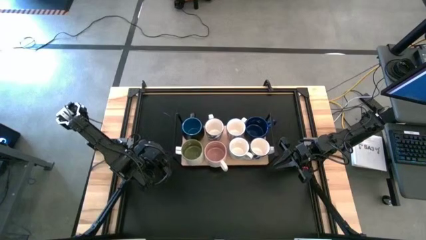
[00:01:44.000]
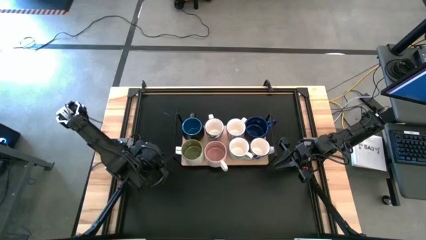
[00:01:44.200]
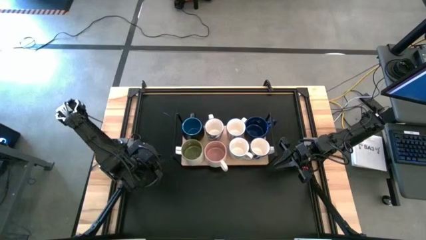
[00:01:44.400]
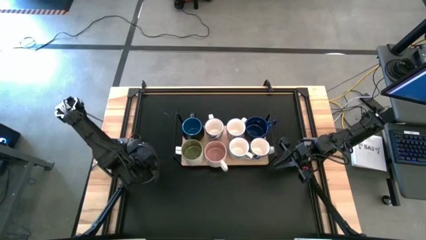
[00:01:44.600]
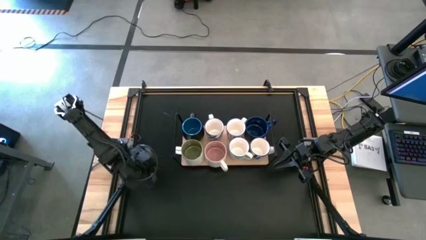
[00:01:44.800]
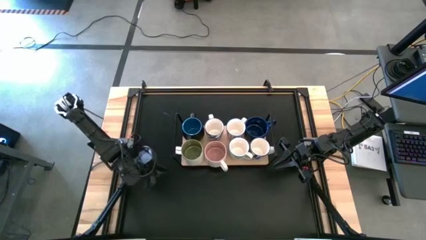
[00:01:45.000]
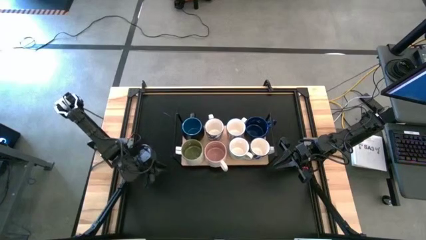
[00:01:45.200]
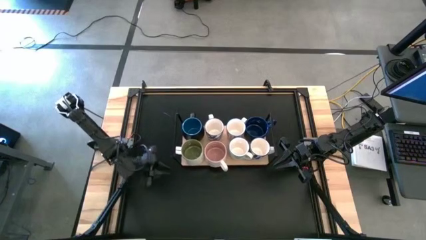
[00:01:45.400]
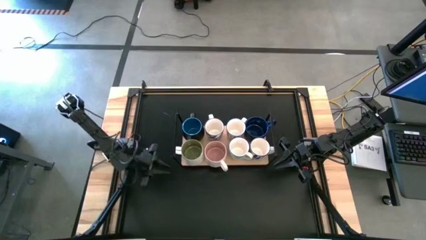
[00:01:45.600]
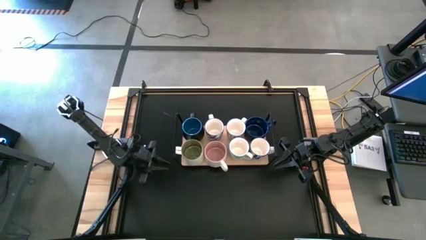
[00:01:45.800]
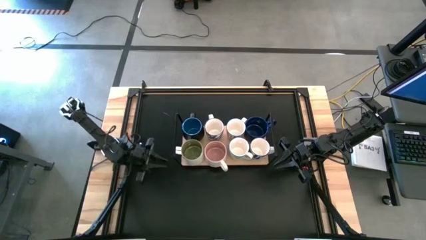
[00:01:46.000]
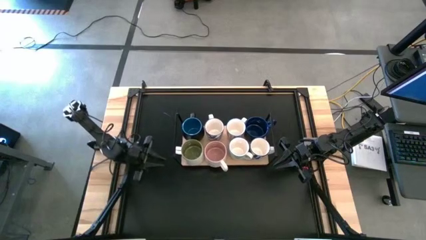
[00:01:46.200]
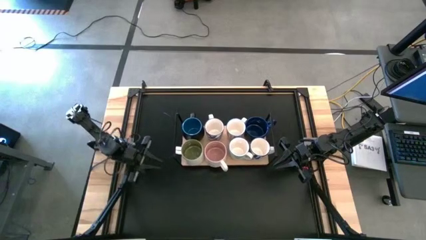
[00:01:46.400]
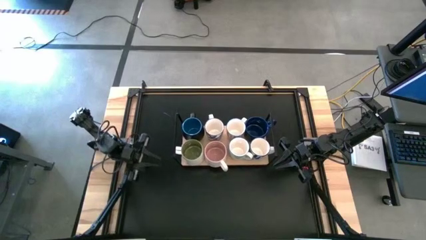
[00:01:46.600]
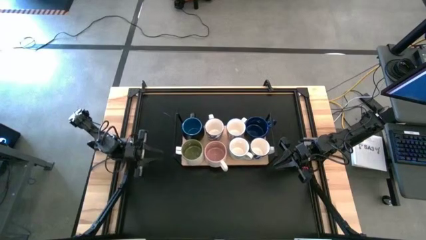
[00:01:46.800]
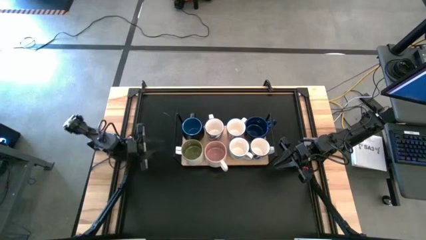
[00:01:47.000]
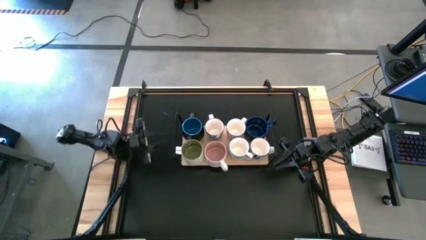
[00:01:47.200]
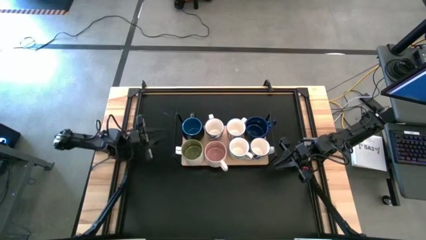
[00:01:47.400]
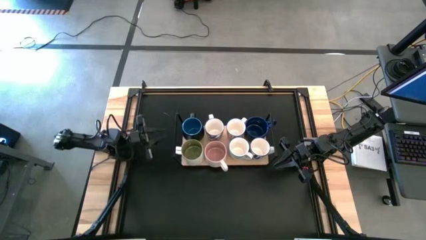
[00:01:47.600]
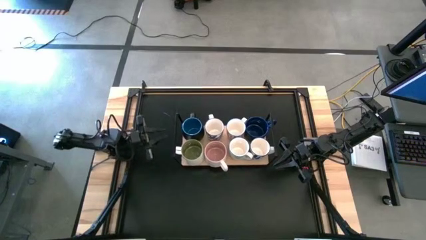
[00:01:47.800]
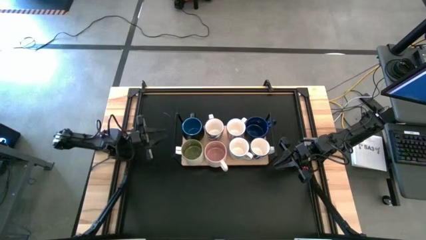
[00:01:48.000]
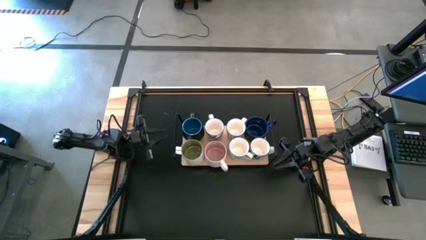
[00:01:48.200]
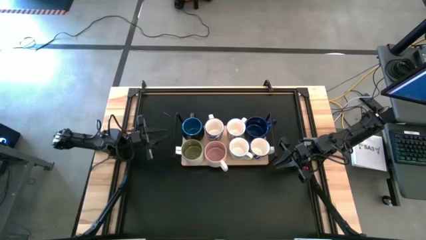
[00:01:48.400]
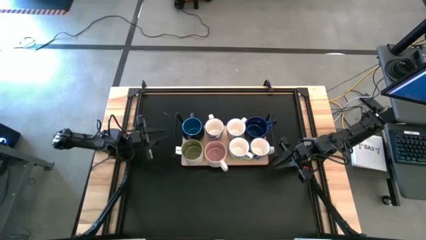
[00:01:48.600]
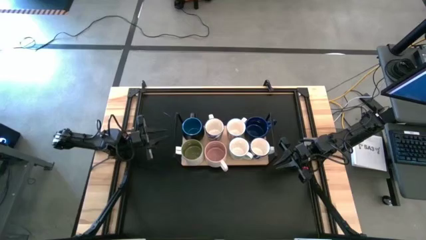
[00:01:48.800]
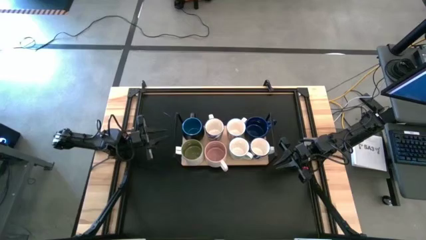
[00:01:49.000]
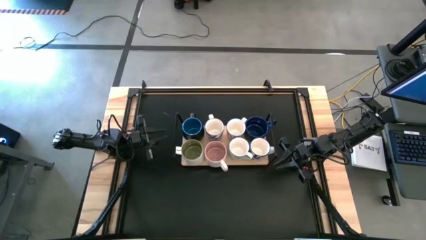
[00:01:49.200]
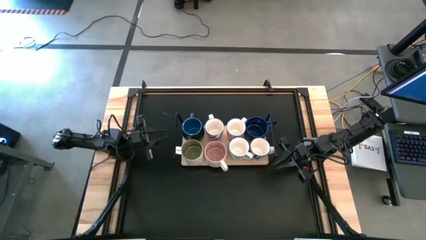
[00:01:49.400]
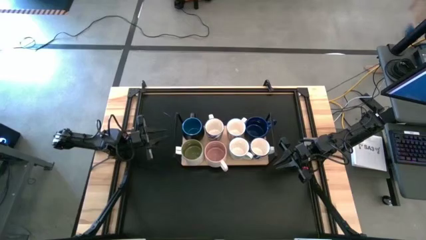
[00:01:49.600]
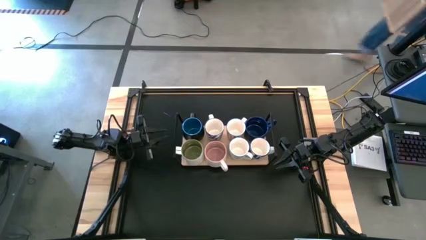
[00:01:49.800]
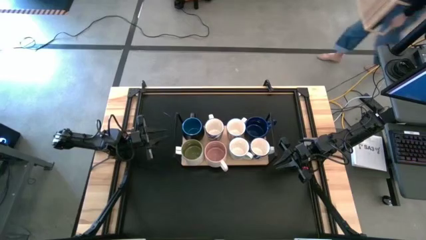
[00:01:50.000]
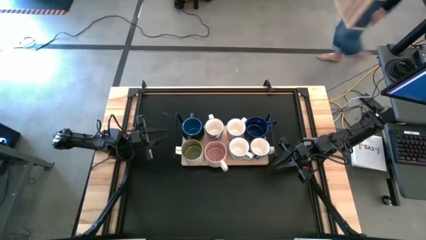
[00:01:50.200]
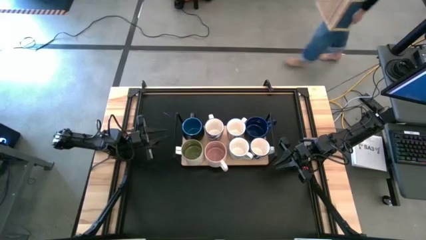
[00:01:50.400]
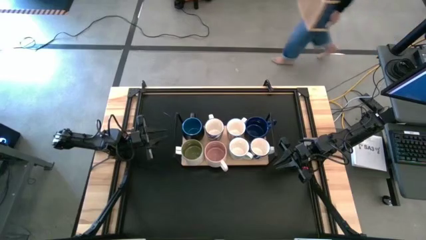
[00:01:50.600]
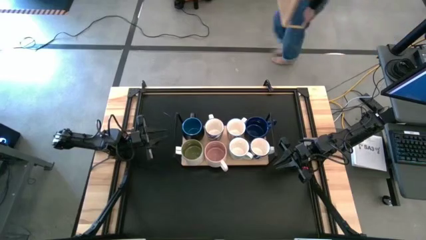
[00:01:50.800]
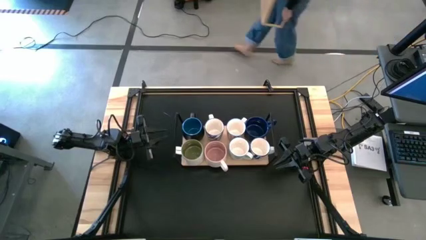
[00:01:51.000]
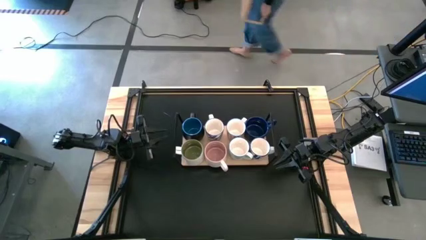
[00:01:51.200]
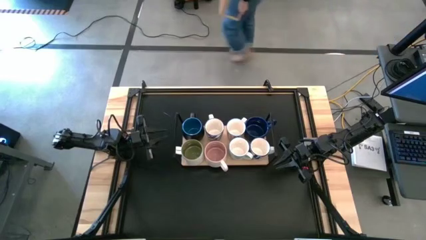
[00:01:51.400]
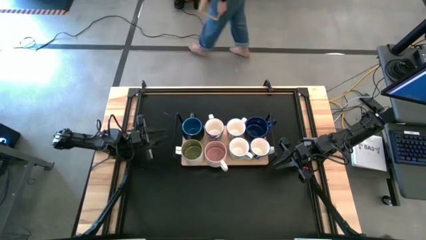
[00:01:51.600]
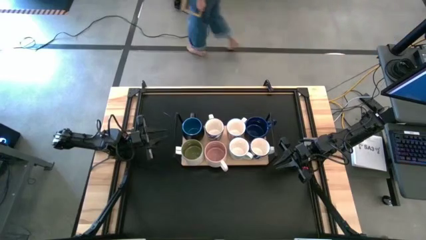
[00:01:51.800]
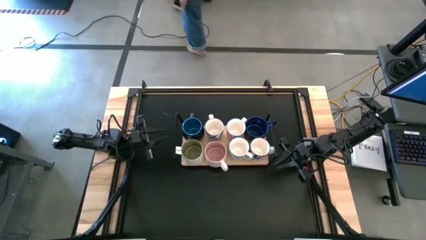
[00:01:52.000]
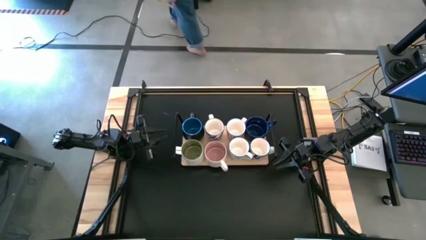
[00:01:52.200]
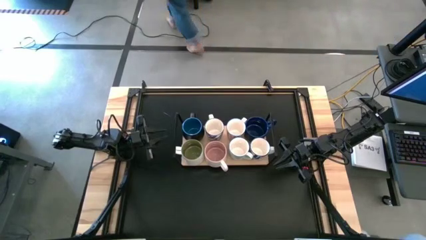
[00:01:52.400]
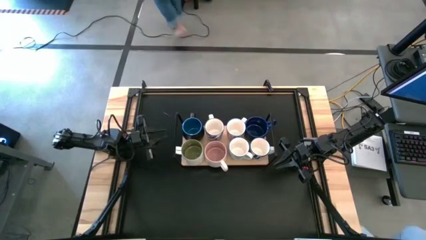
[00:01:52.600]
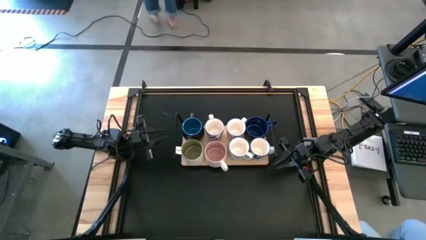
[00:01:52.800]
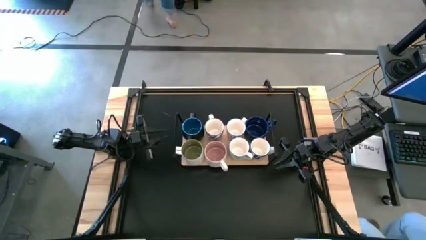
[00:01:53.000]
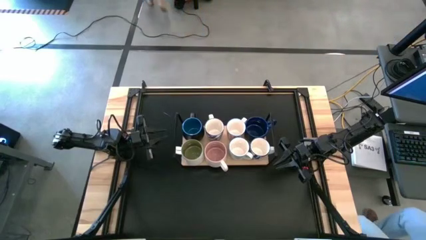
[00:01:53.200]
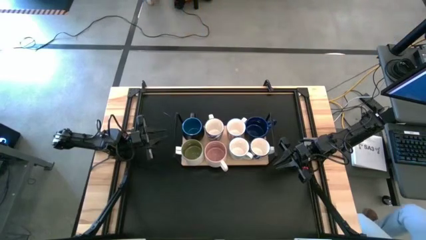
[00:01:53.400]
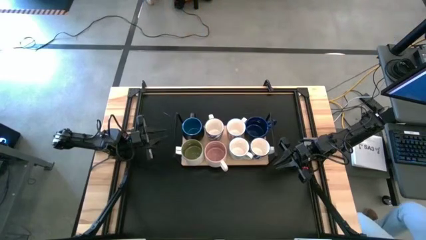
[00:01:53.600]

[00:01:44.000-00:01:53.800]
Task: Place coffee mugs
Return to Home Position

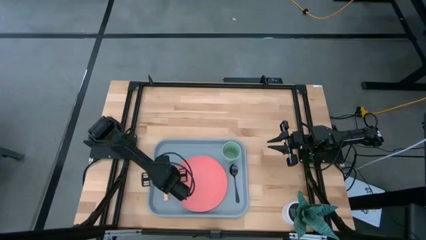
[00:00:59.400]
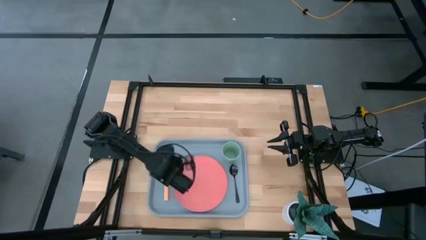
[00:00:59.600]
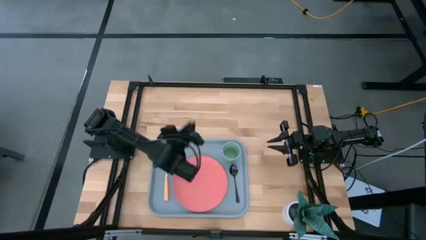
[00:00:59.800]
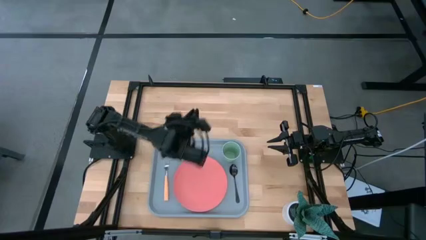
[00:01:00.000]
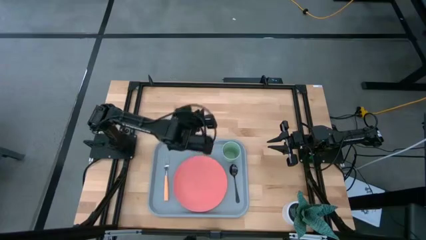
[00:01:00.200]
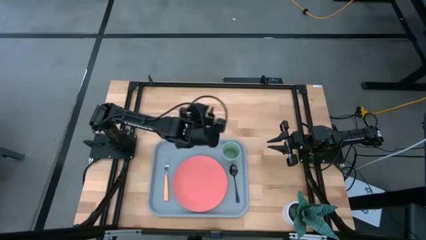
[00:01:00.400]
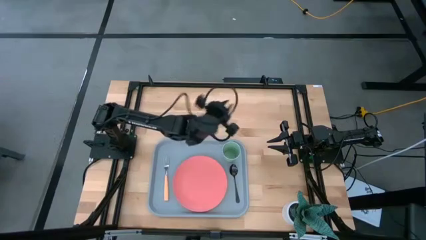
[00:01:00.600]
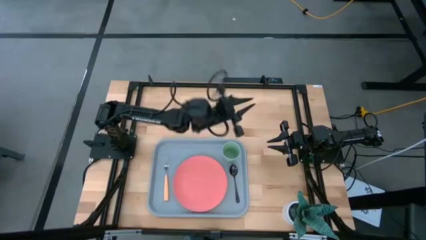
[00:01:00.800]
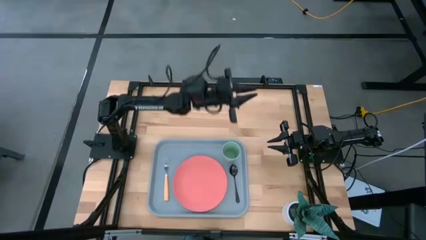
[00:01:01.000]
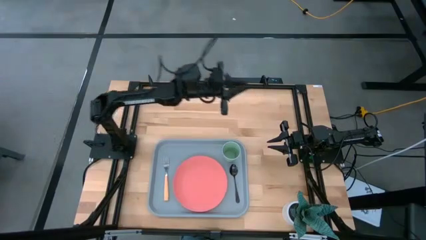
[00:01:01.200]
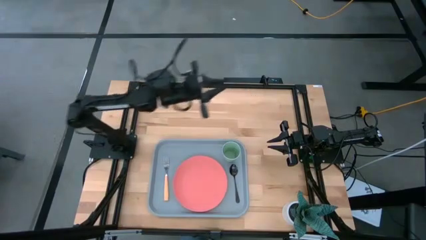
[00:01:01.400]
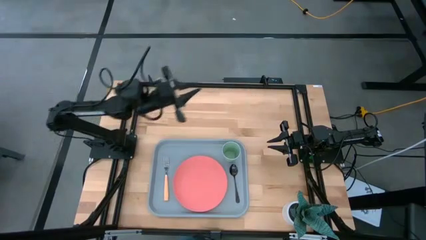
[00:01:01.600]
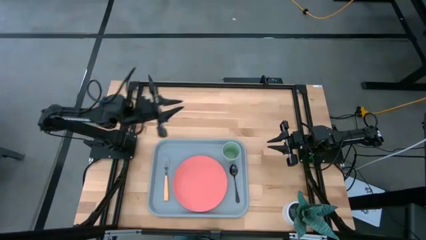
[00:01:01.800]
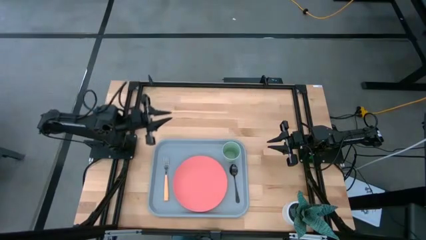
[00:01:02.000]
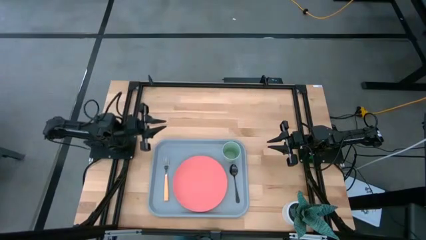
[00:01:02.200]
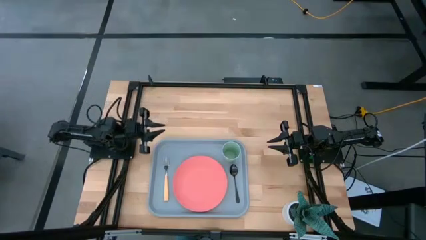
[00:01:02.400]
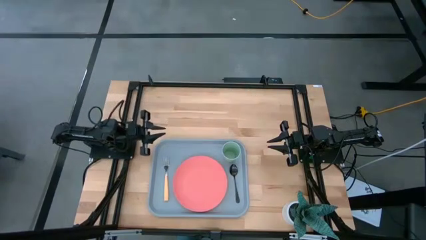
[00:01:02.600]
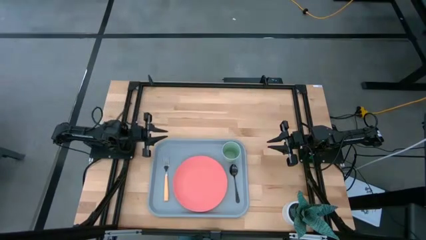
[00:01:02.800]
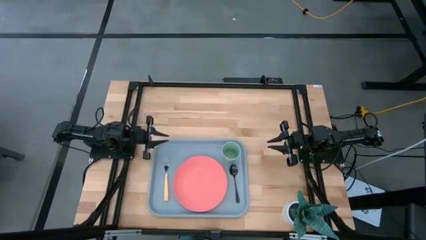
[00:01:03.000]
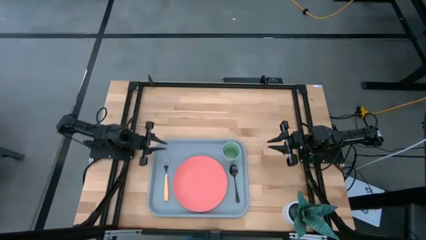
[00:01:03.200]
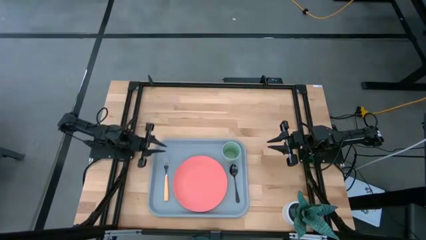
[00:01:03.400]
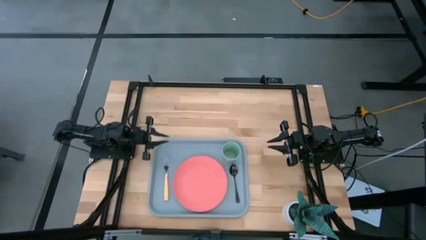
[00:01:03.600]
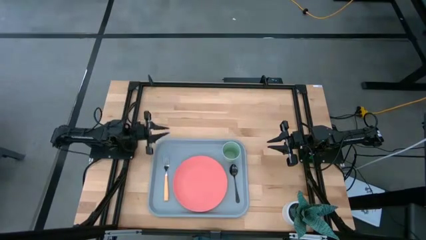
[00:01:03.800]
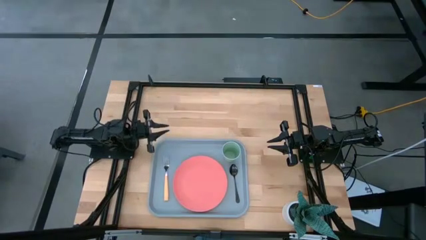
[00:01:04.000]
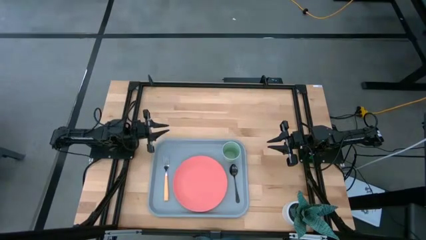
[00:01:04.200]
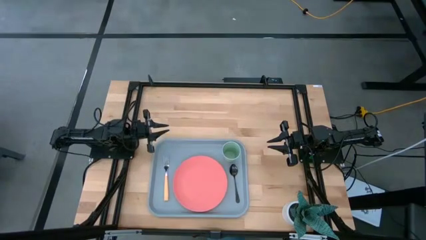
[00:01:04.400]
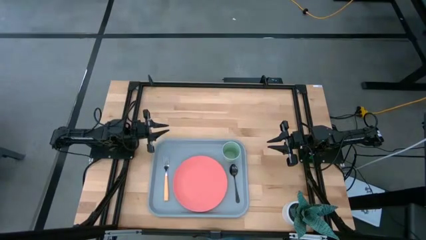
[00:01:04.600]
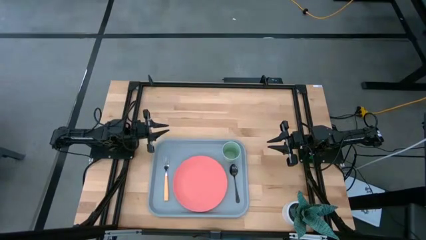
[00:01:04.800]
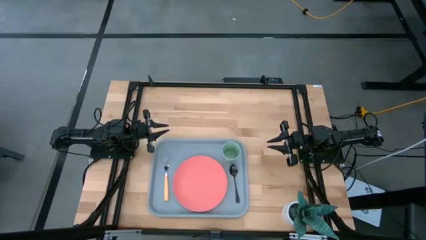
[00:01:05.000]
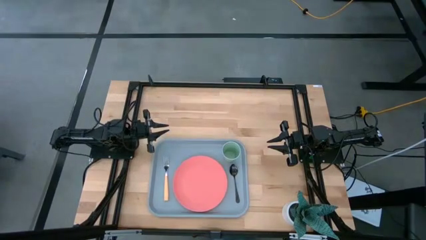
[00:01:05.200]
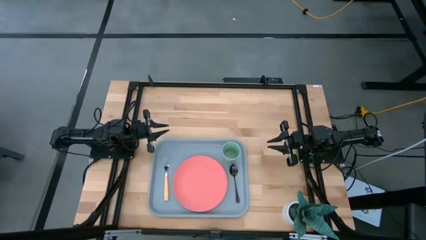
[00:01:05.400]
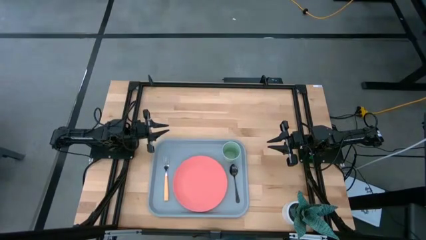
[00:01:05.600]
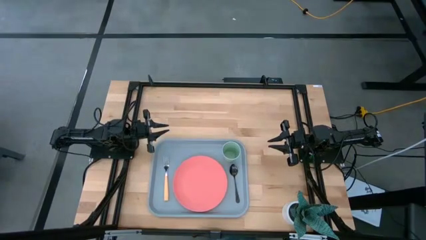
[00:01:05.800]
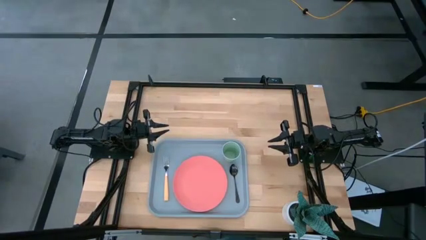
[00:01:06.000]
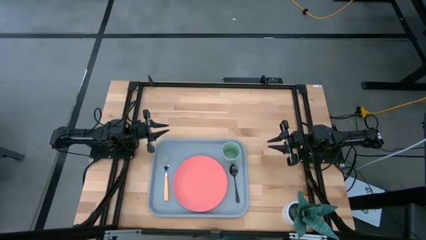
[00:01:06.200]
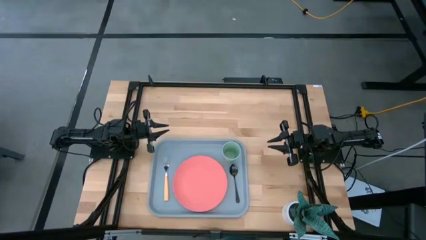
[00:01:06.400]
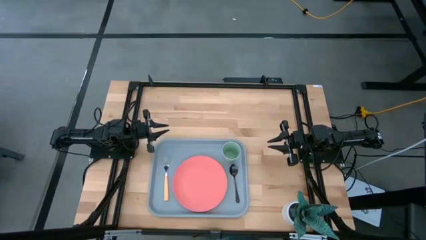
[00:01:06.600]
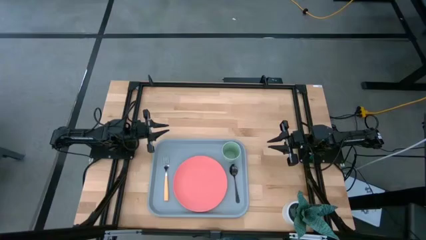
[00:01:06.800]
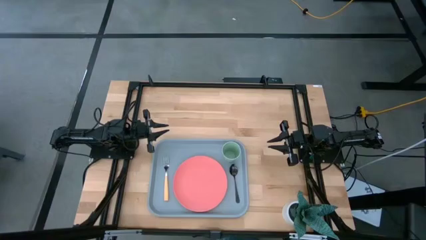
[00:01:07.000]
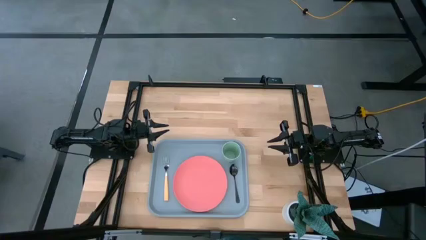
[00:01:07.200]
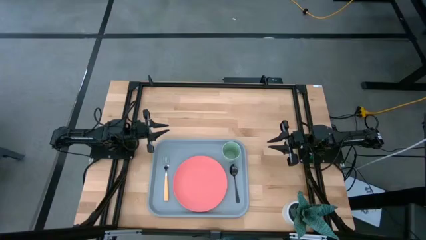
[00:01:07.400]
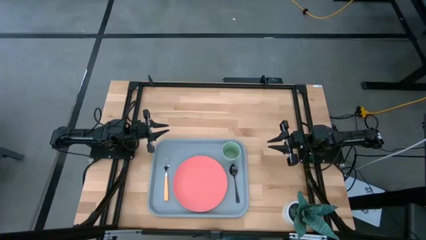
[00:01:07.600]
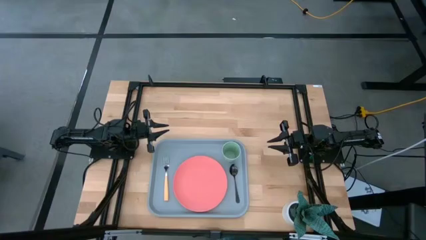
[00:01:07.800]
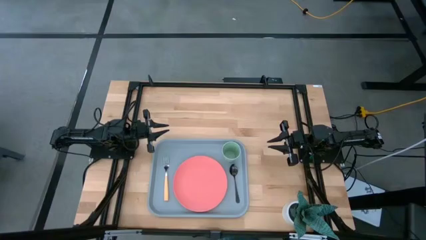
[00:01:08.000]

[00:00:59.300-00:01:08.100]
Task: Pick and place plate/cup/fork/spoon on tray
Return to Home Position
